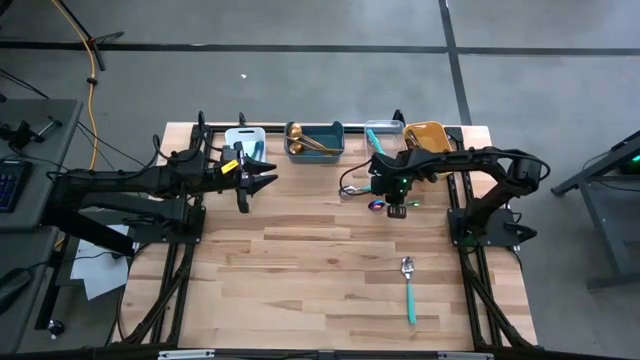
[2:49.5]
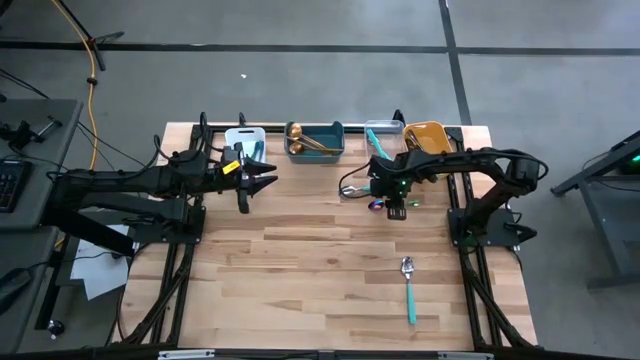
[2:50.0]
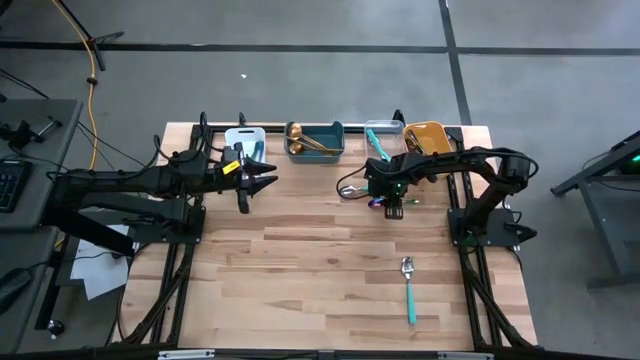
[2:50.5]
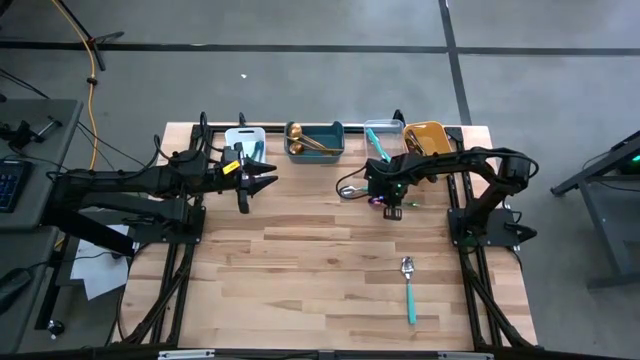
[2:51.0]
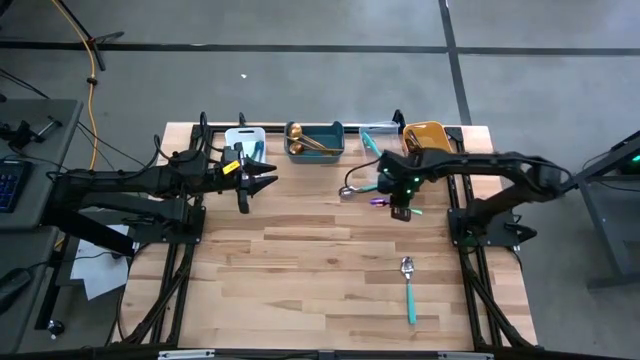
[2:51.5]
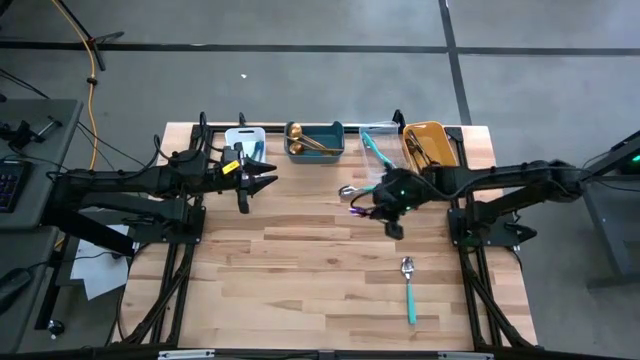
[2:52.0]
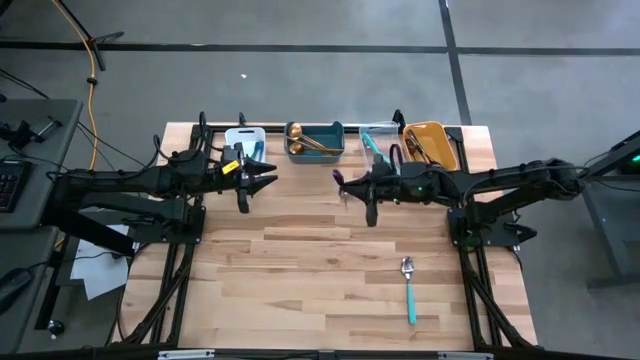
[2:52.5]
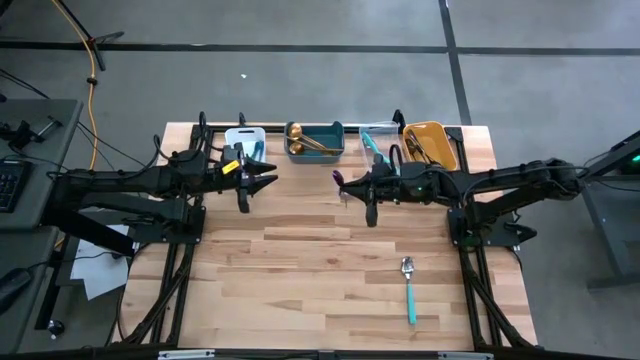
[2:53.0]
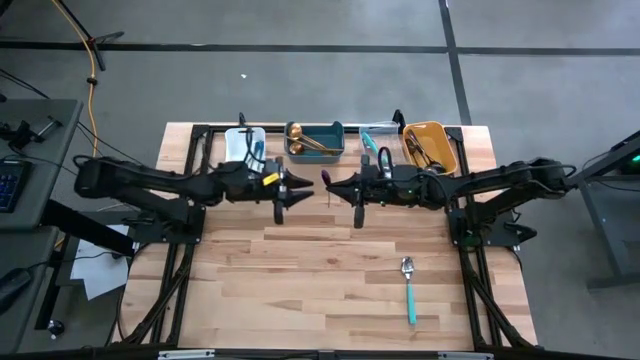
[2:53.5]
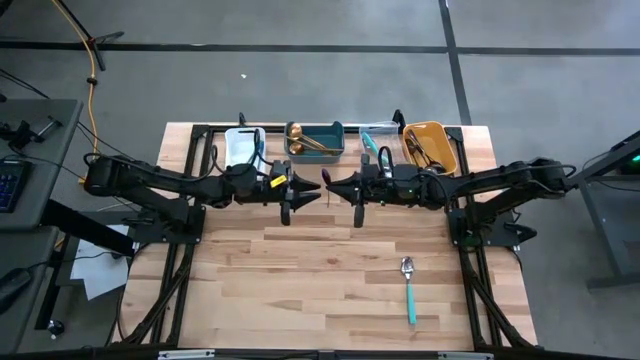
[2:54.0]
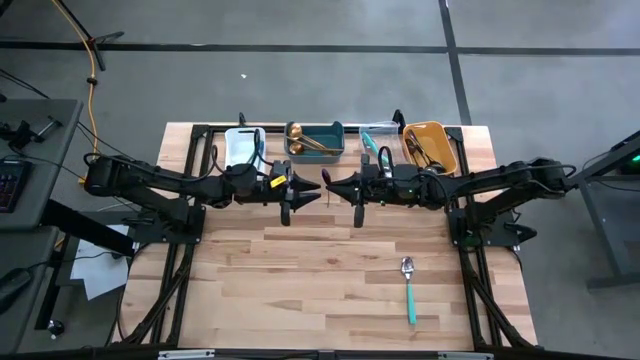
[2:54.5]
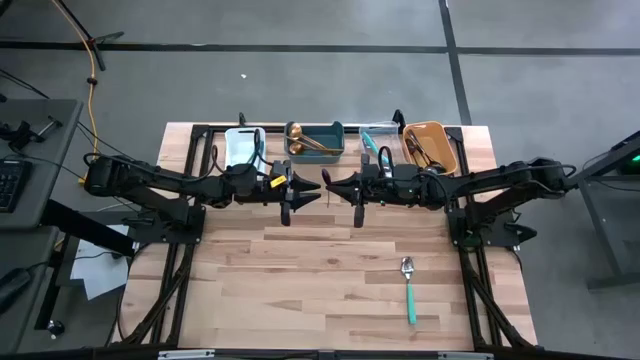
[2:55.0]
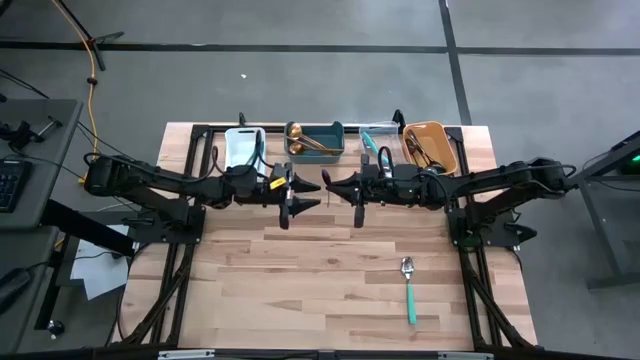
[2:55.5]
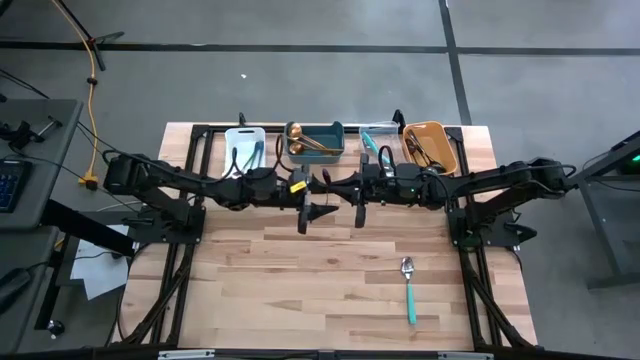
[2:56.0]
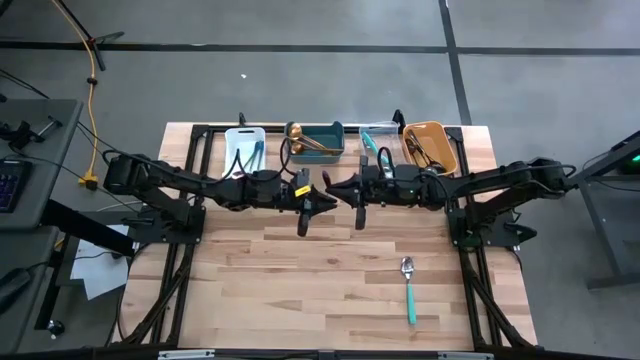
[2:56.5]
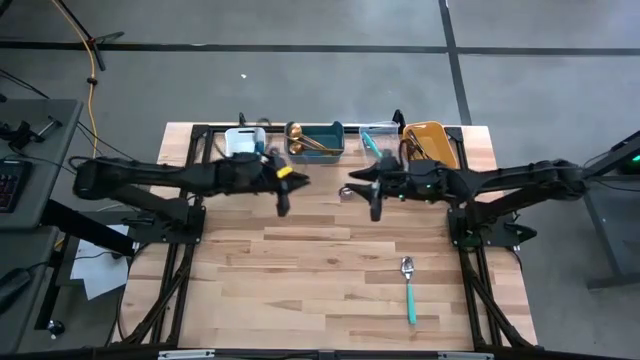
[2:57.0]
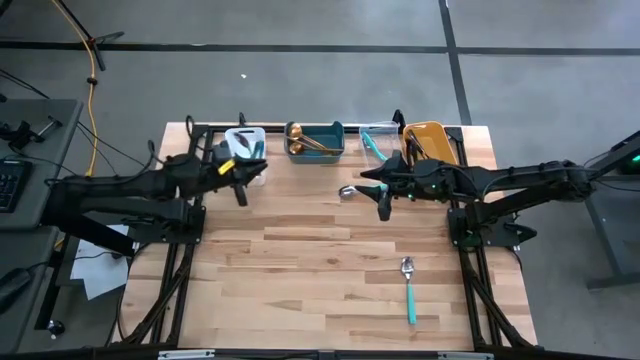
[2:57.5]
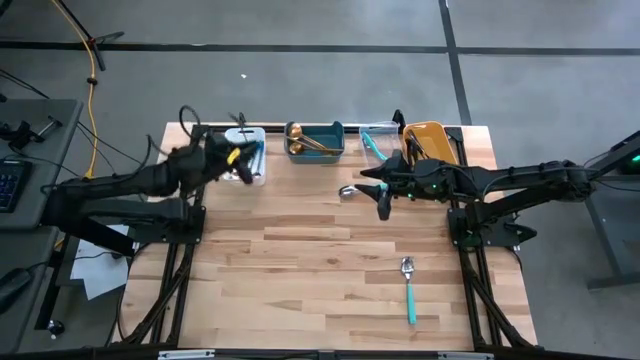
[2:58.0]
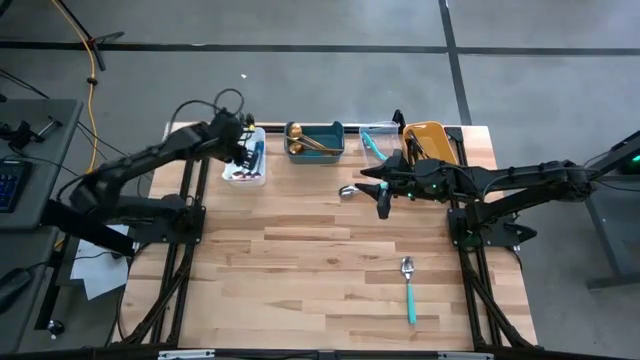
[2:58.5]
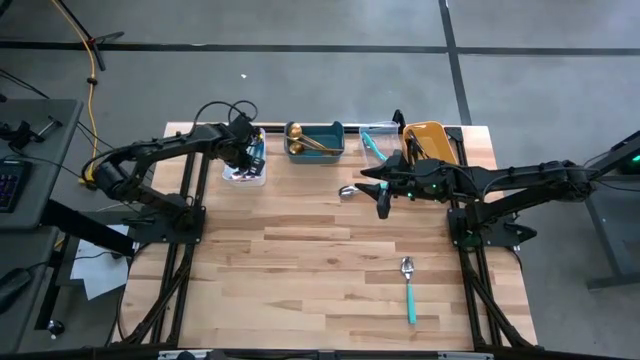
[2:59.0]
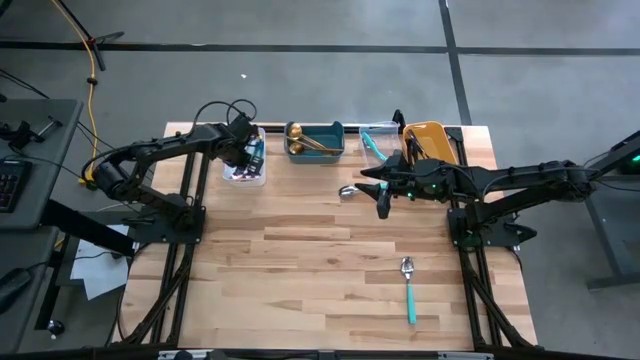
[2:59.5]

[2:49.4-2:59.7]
Task: Sort silverware by color (type)
Put the green spoon into the white bin

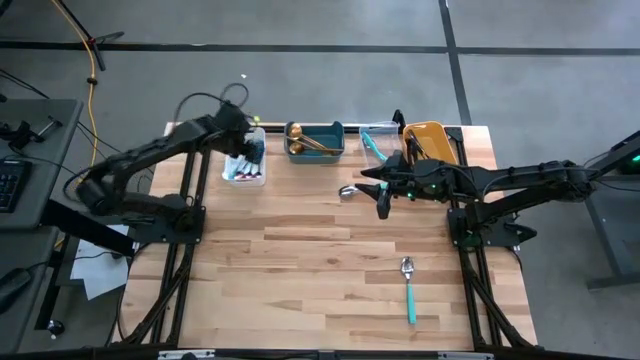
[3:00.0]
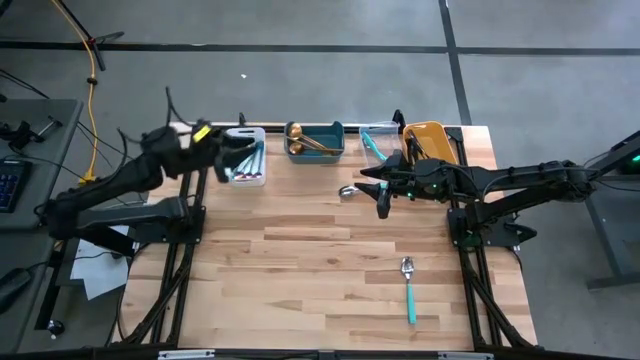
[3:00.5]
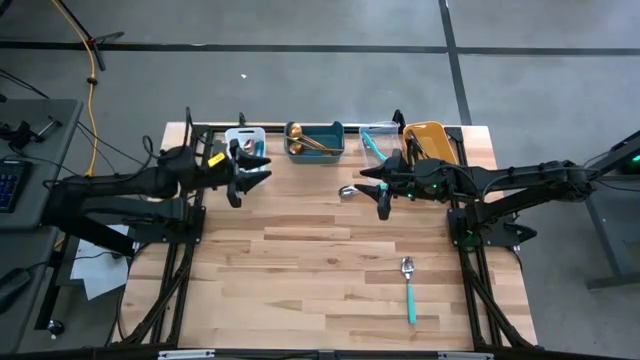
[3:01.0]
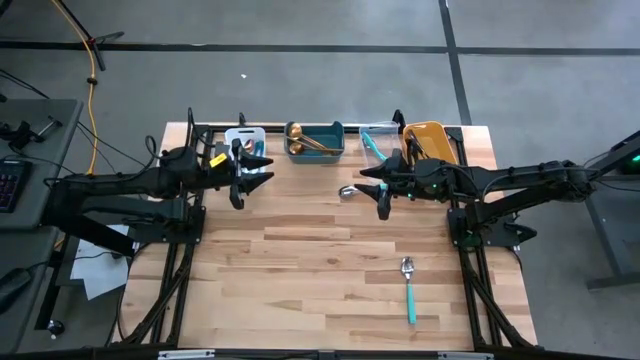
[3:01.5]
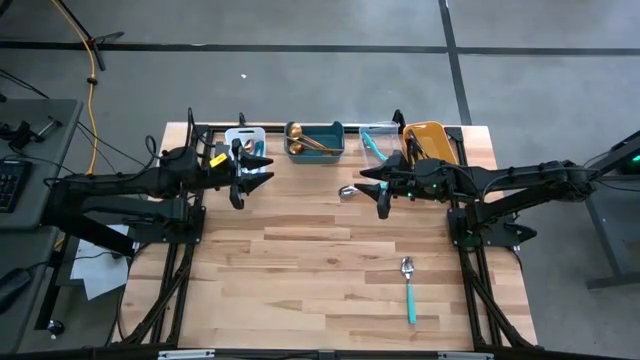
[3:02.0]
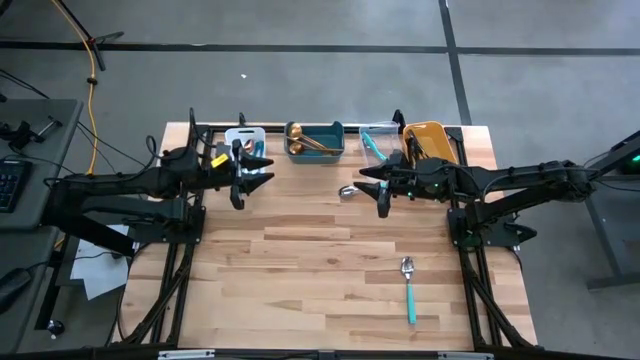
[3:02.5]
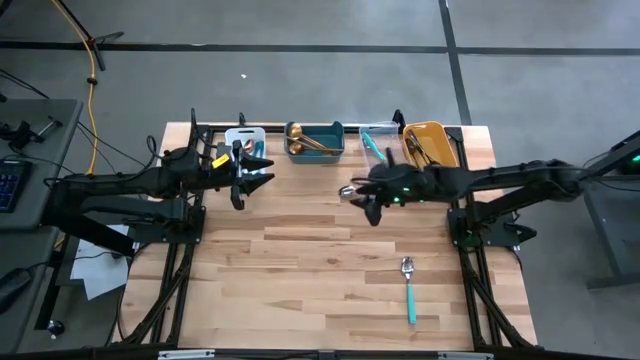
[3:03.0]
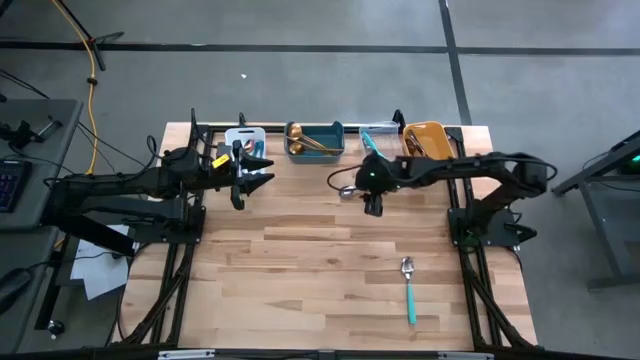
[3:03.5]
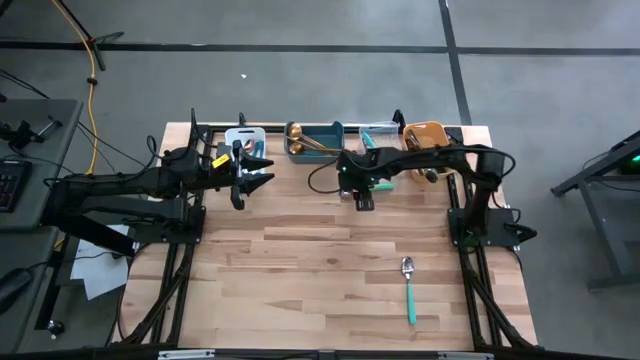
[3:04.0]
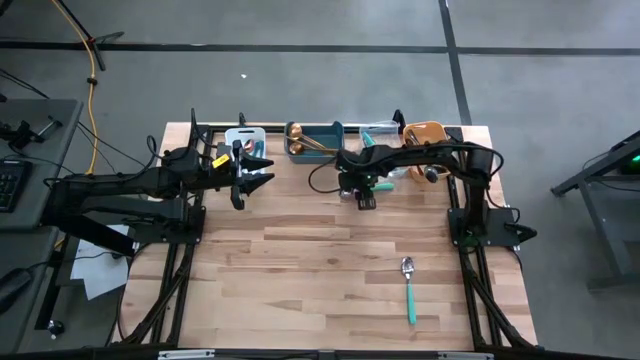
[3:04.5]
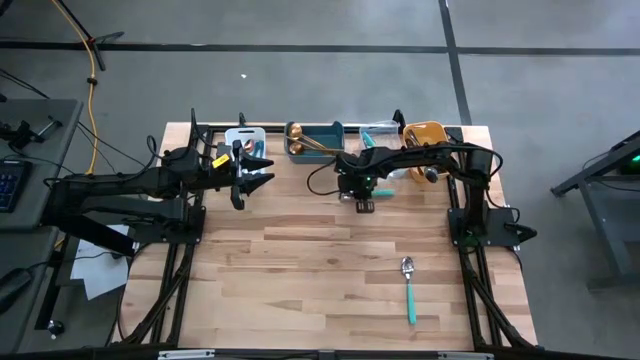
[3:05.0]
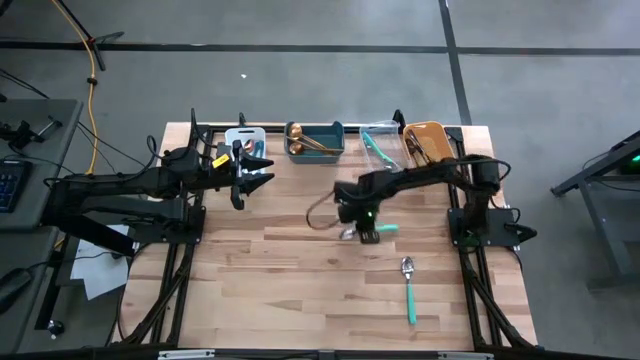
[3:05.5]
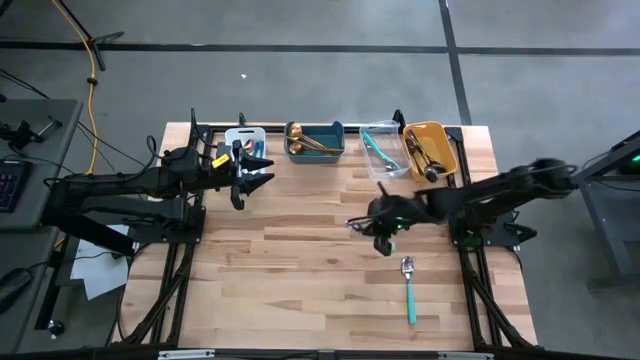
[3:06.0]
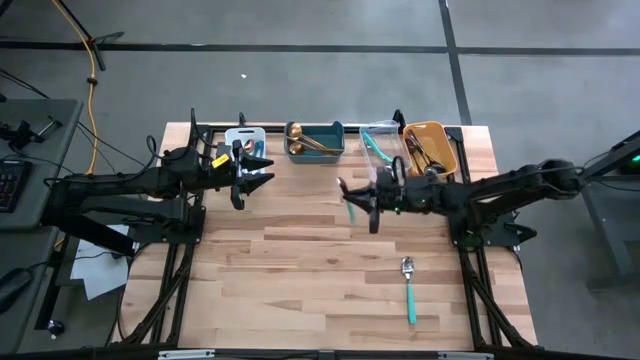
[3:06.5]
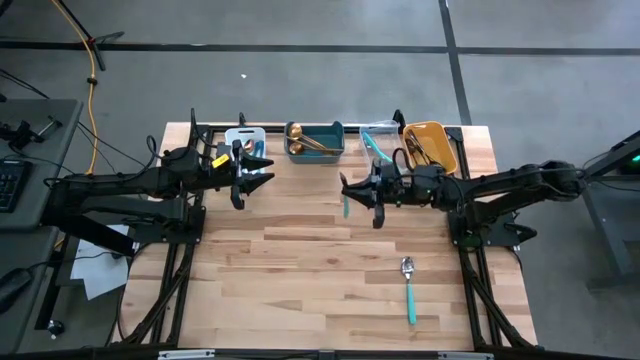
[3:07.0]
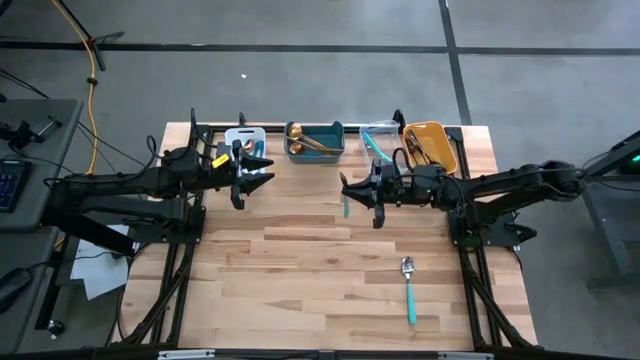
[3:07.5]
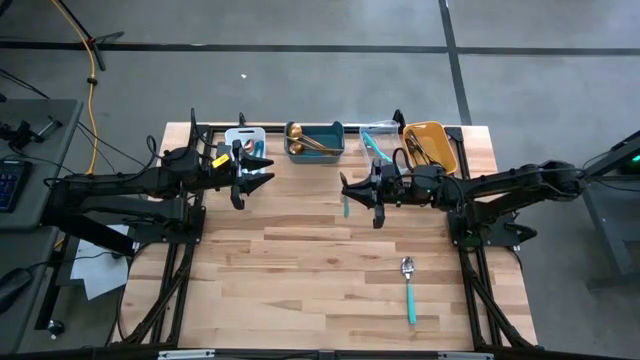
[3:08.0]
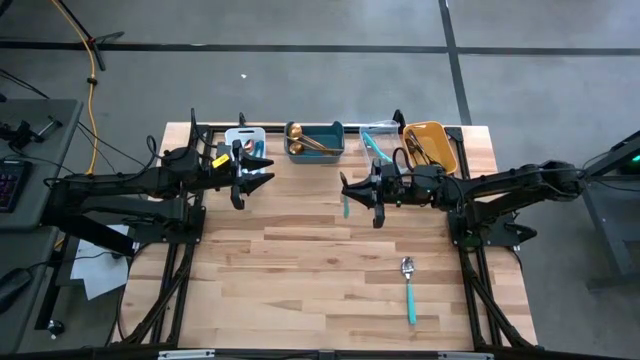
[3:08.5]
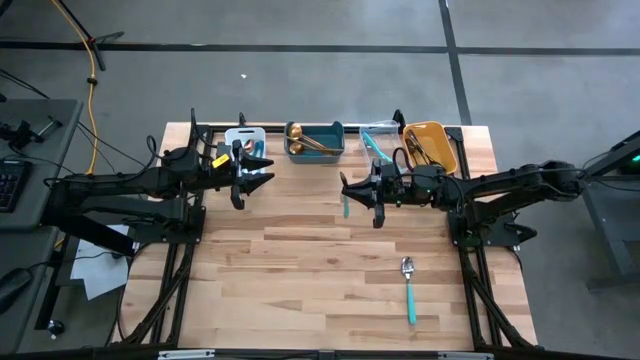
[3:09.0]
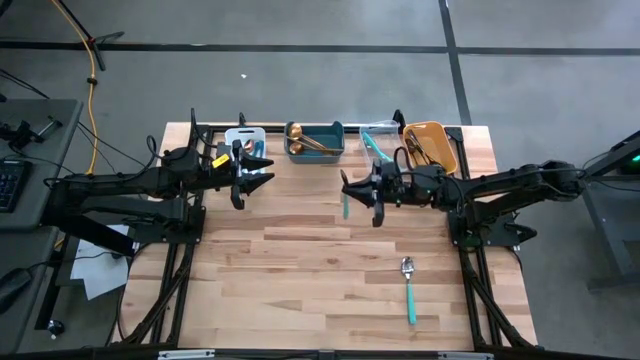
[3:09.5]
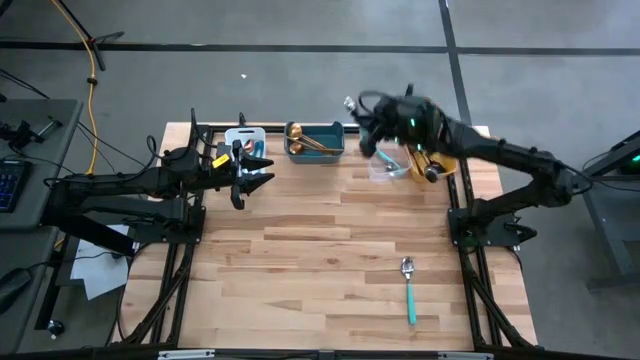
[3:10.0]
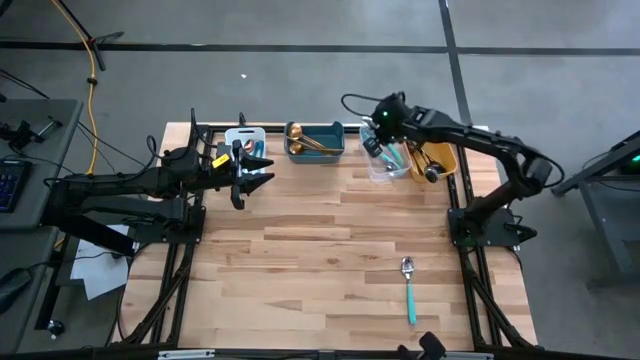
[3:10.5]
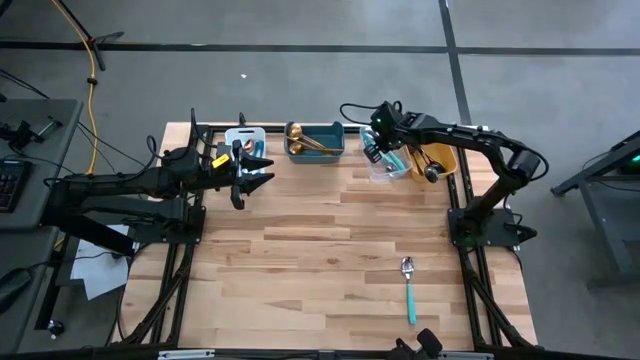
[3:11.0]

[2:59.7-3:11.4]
Put the light blue spoon into the transparent bin
